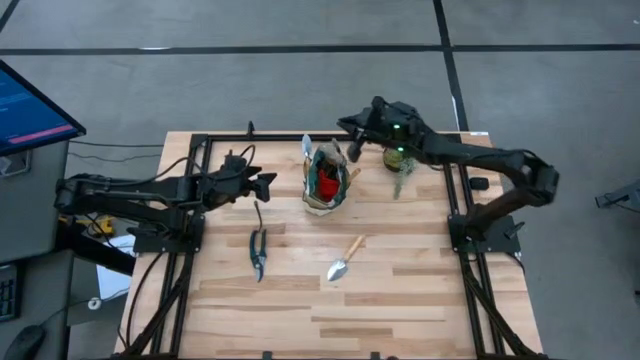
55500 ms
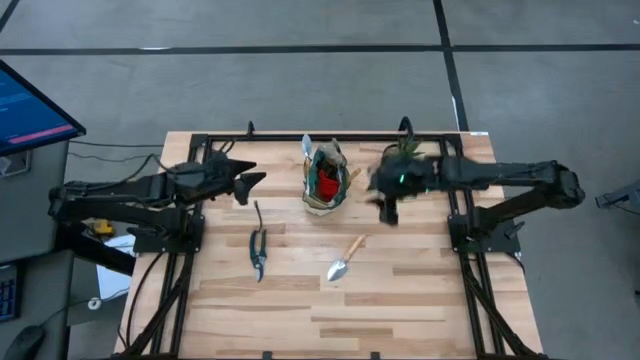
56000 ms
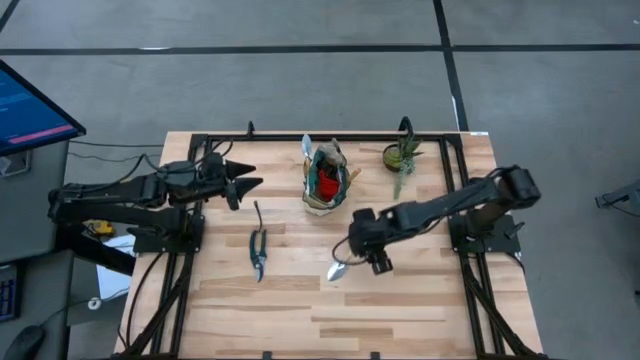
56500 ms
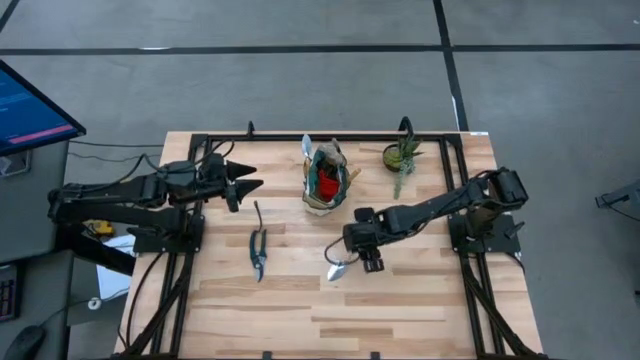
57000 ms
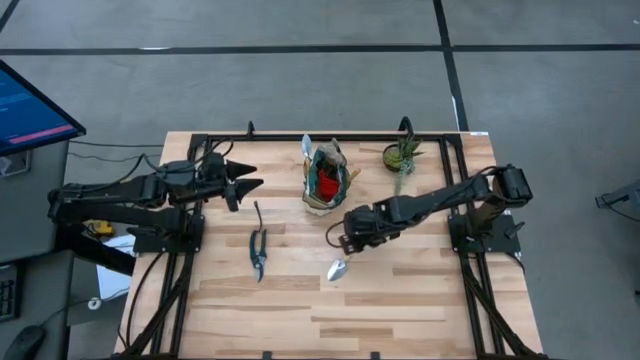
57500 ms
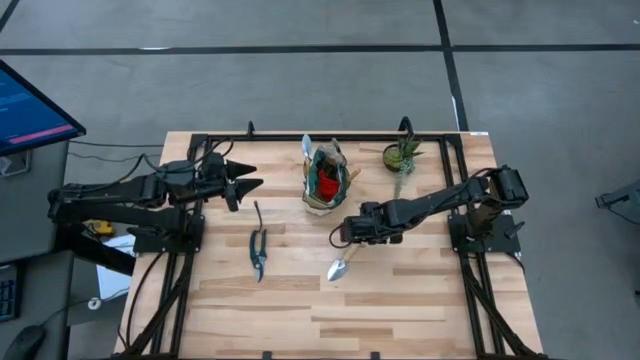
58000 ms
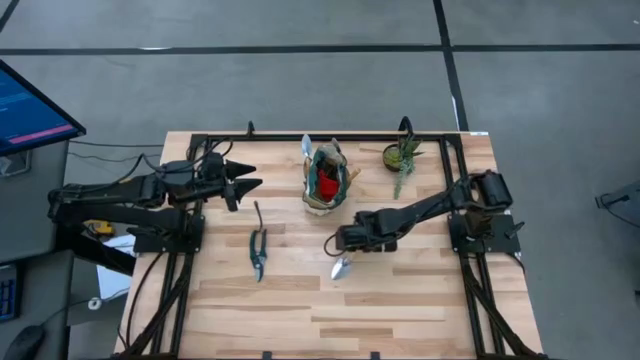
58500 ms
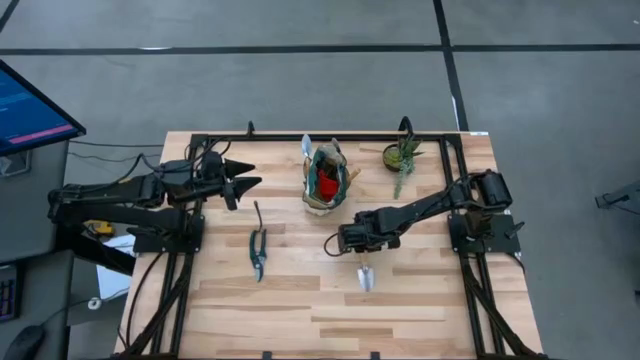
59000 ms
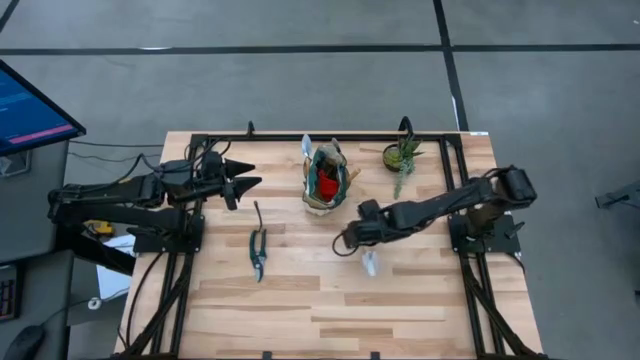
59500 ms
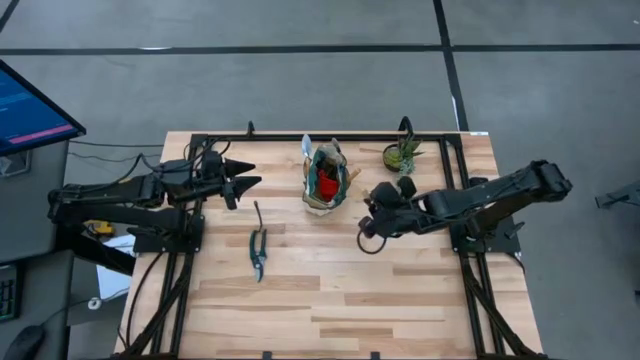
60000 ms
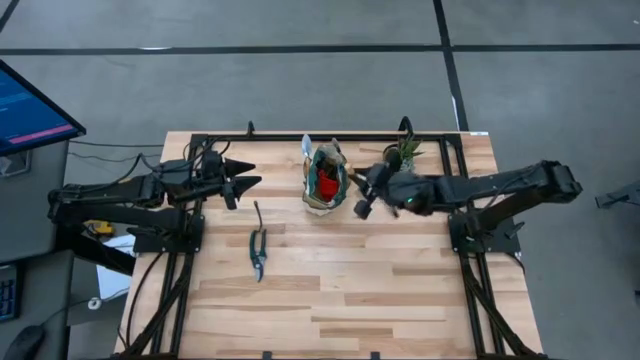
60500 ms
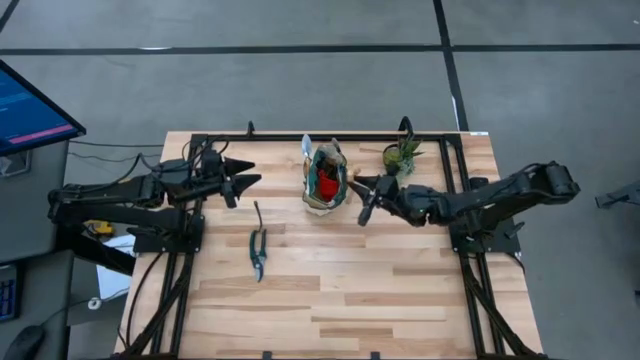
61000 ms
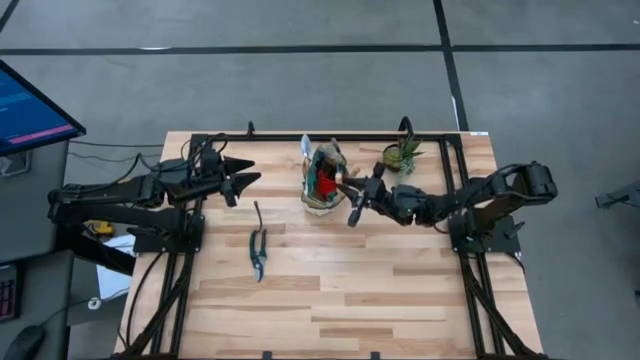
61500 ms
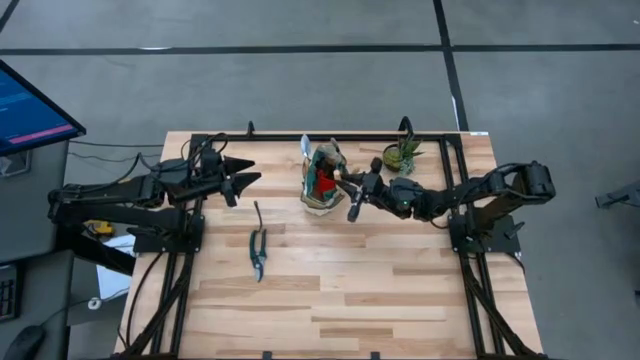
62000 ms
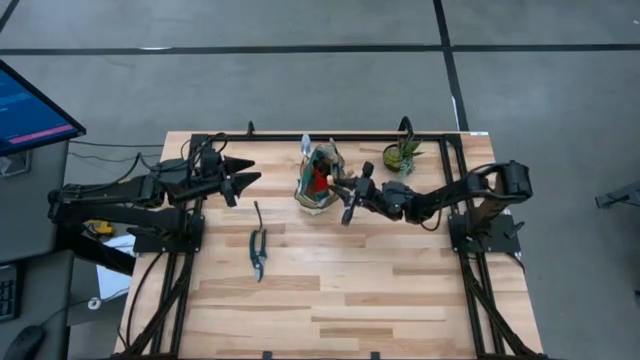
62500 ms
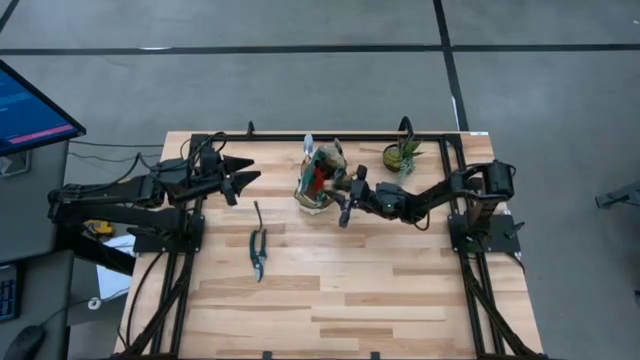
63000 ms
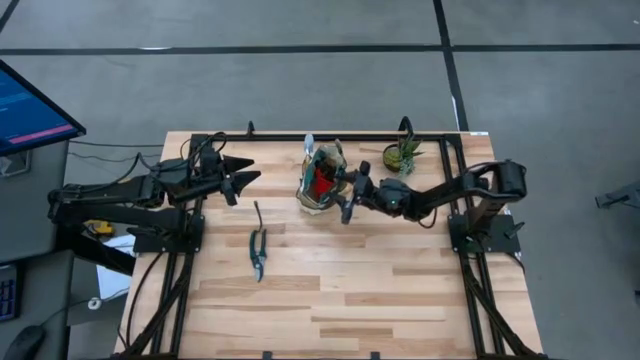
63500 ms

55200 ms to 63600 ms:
Task: Pick & Place Garden tools in Gardening bag
Put the brown trowel into the brown gardening bag

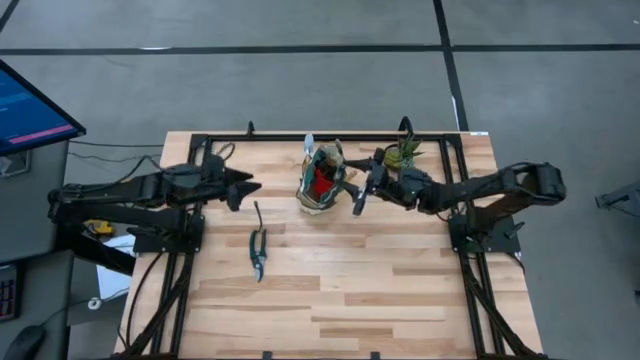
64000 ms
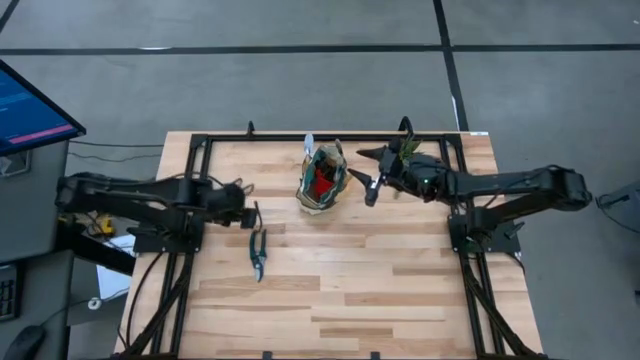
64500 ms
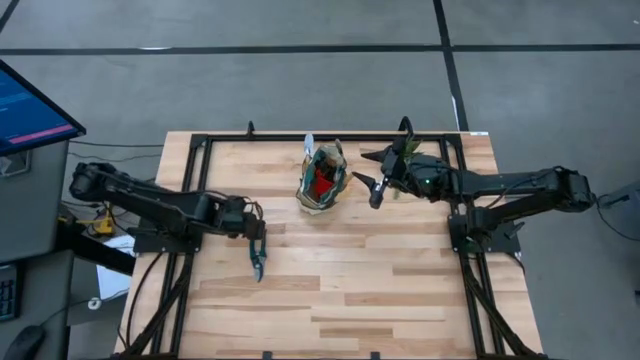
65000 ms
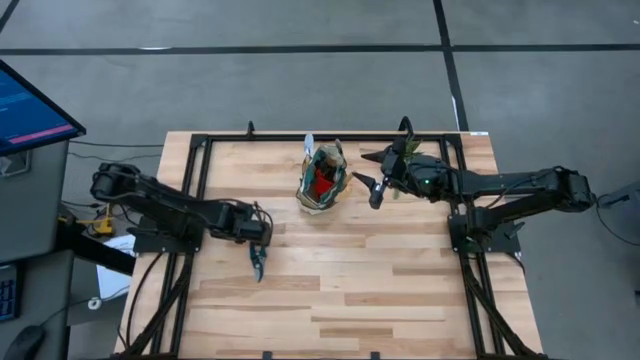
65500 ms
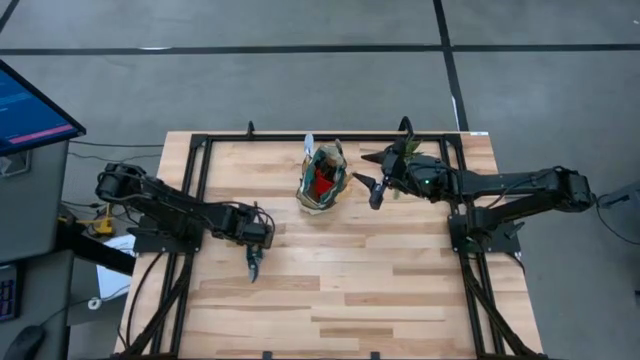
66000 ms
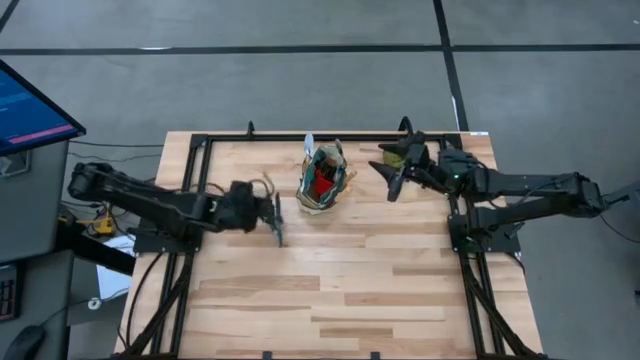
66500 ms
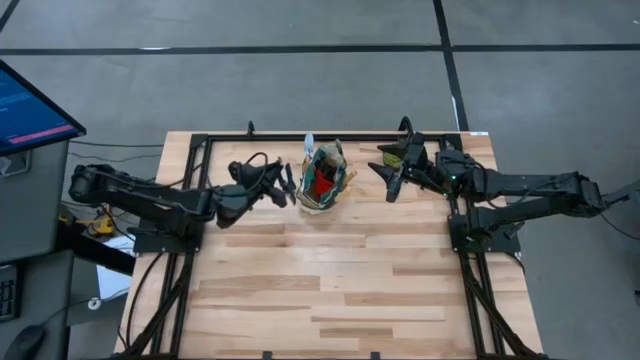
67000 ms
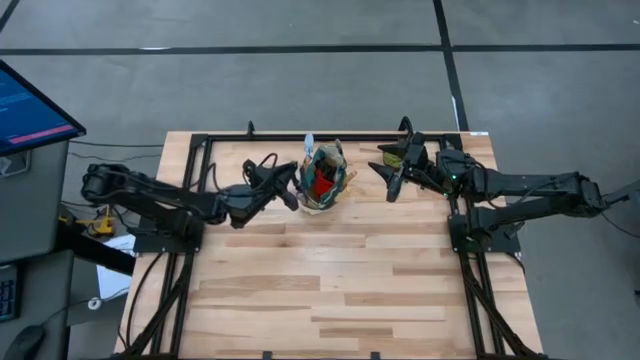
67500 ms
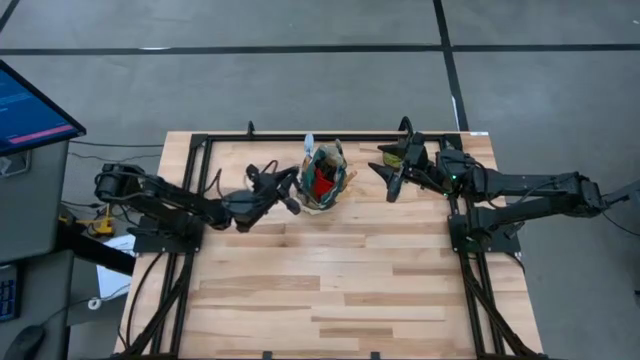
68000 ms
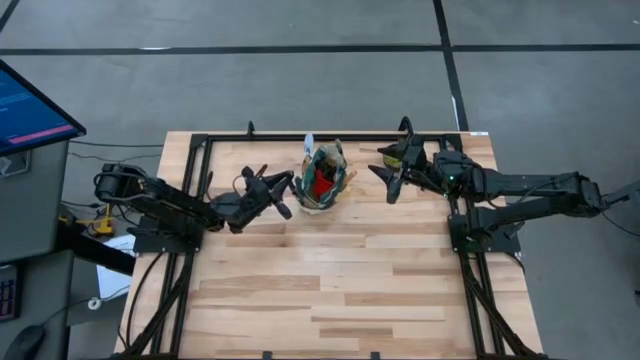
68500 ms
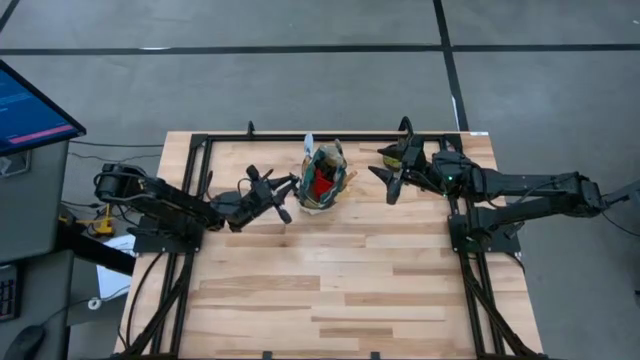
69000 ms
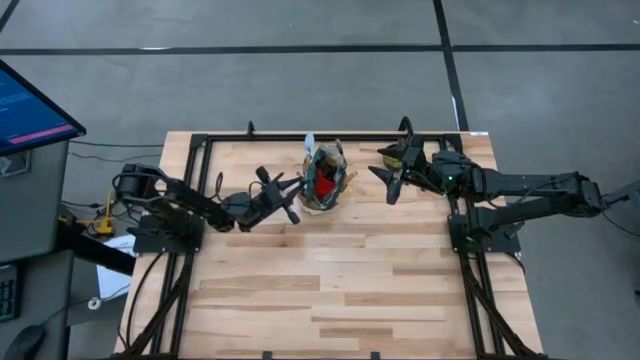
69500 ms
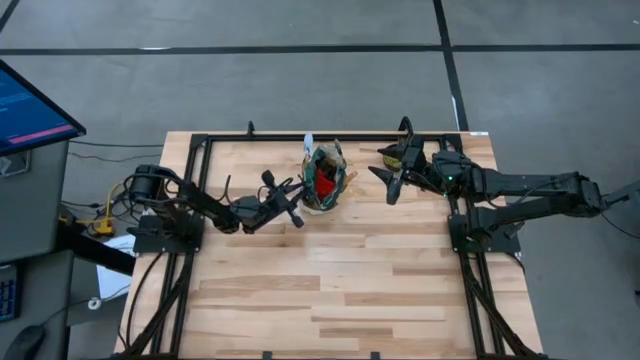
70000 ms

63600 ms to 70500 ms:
Put the brown trowel into the brown gardening bag

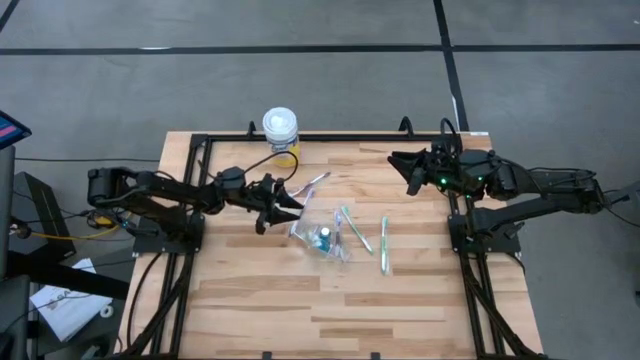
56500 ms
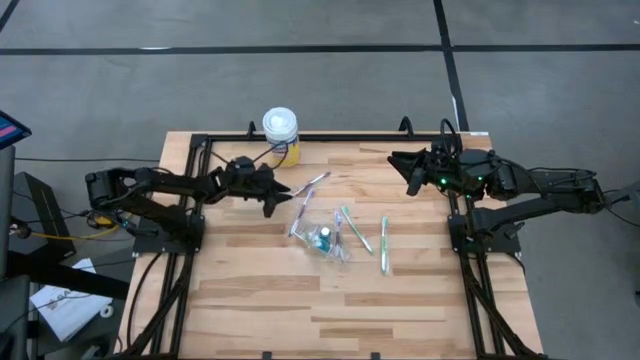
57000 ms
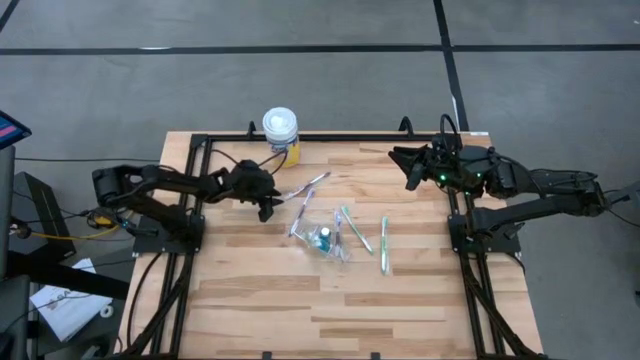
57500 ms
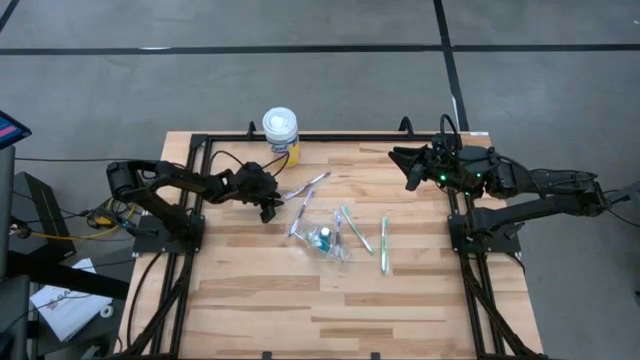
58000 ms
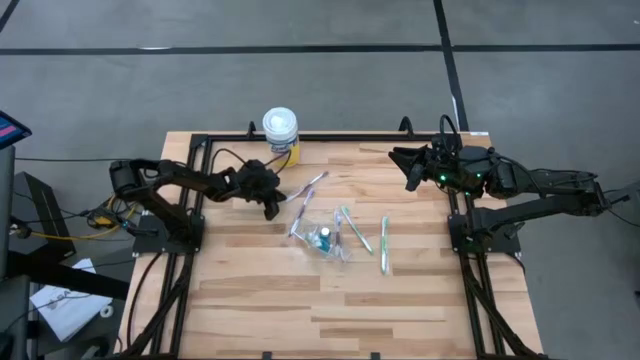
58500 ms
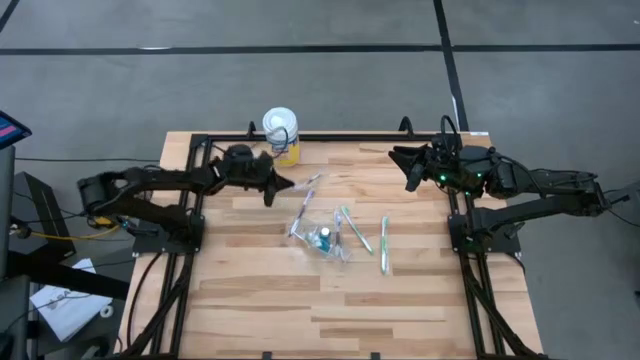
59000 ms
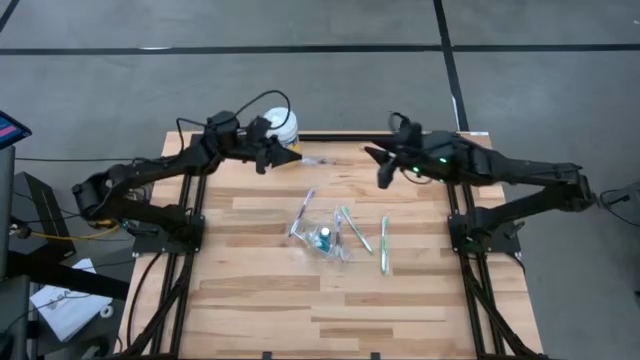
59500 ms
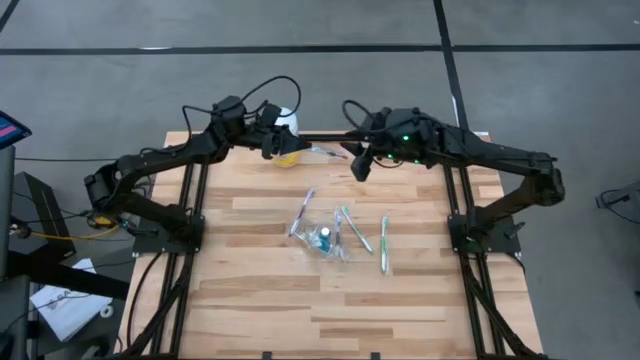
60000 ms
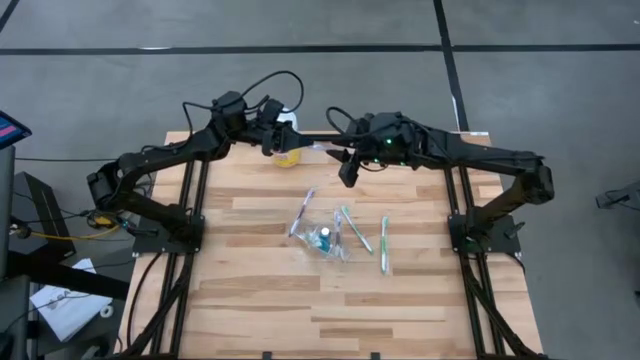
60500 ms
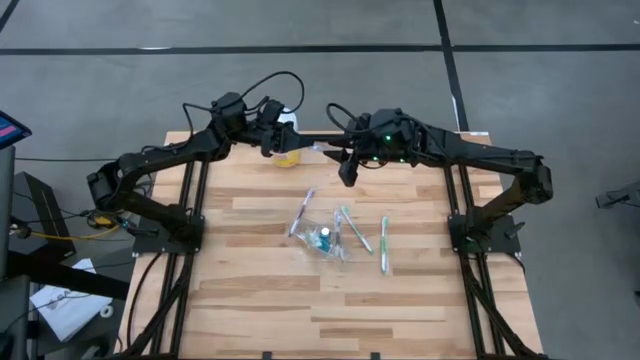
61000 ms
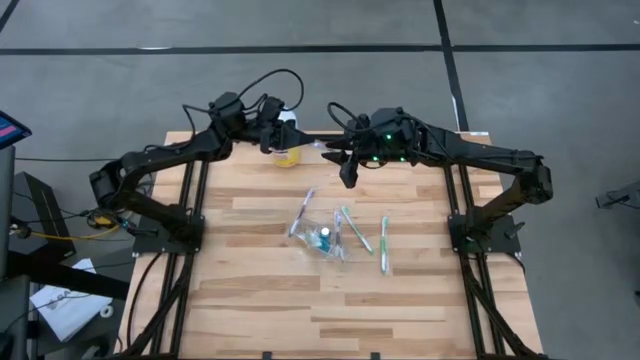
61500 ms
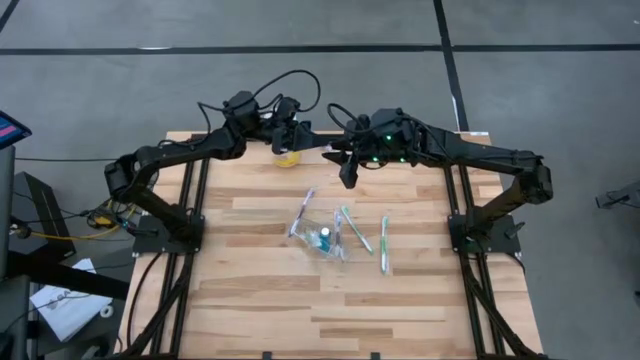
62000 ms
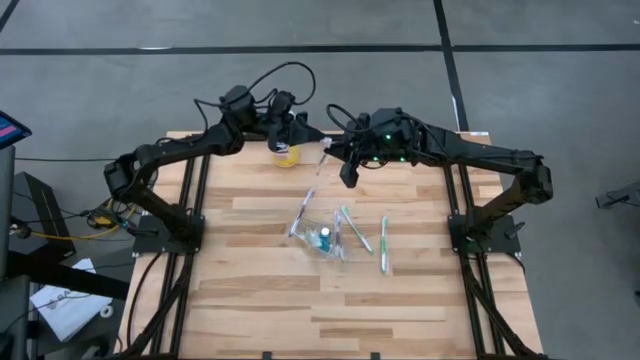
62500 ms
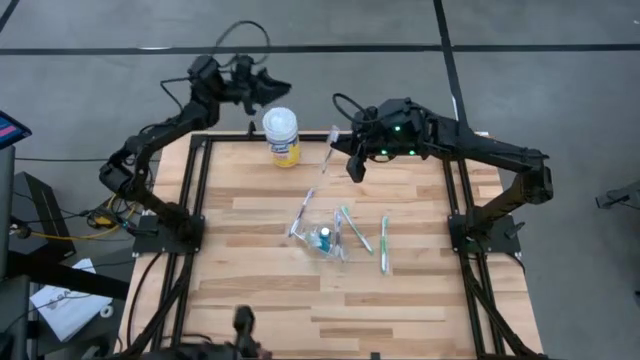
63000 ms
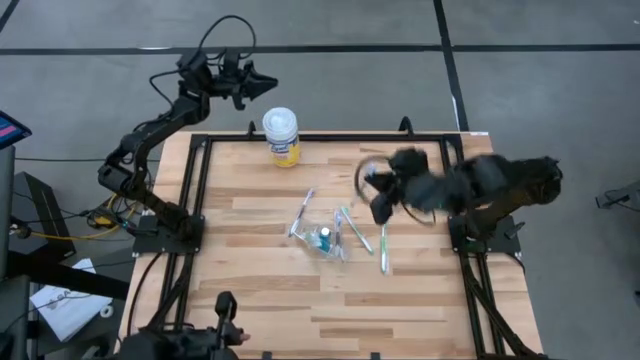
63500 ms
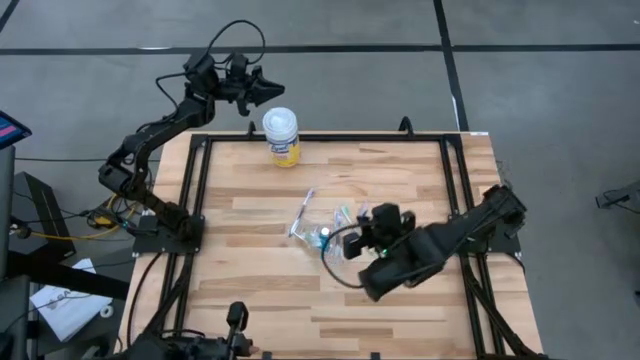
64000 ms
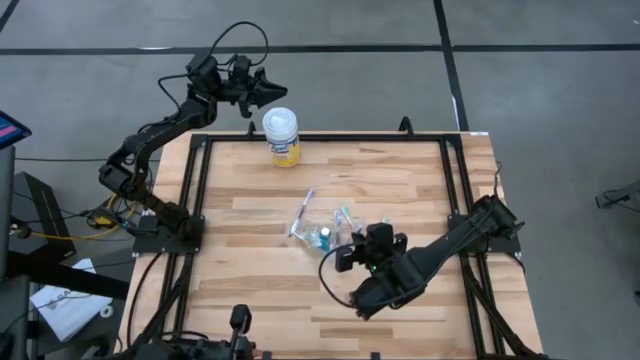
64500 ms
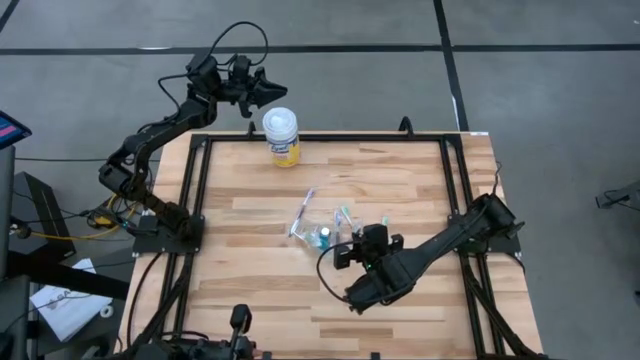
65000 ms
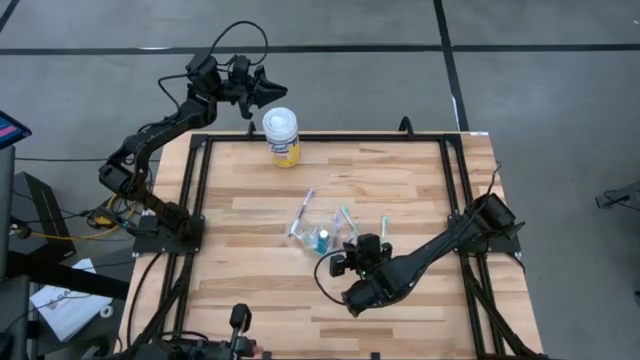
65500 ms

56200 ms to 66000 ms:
Task: Pick & Place toothbrushing station
Put the purple toothbrush into the right compartment of the transparent organizer
